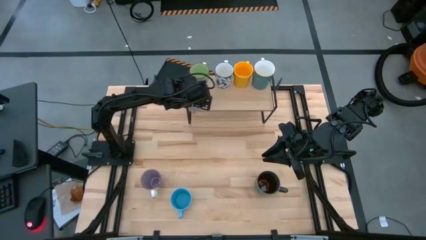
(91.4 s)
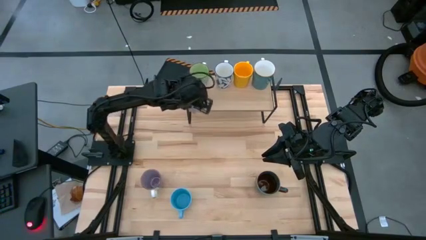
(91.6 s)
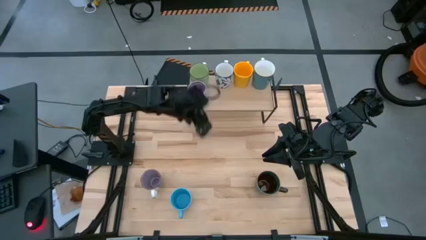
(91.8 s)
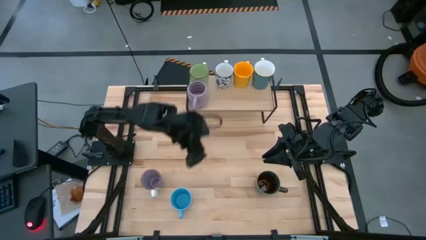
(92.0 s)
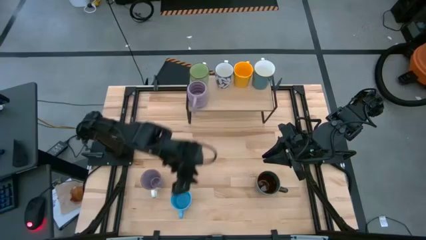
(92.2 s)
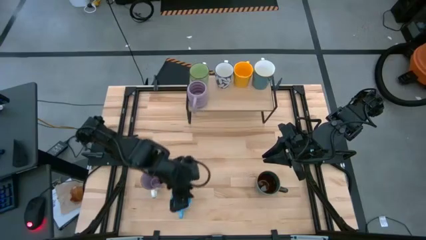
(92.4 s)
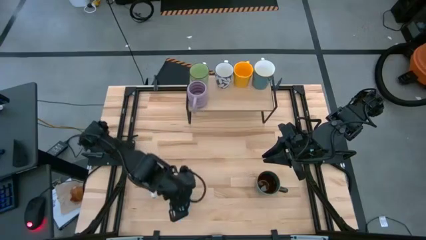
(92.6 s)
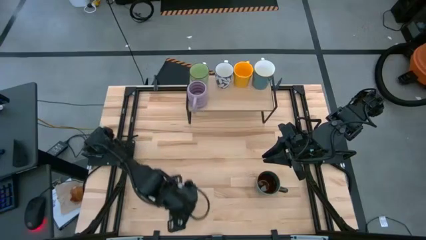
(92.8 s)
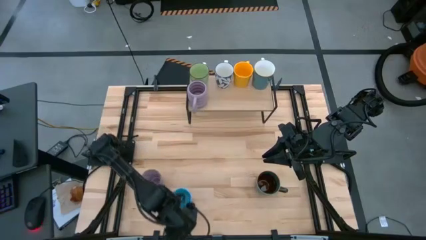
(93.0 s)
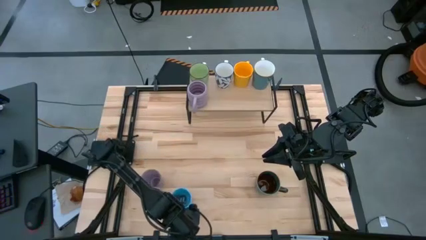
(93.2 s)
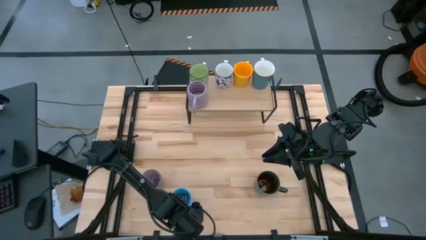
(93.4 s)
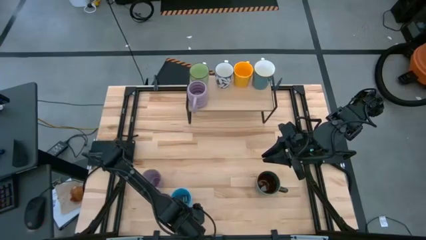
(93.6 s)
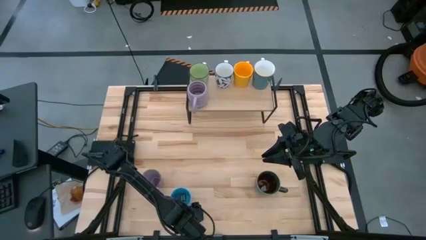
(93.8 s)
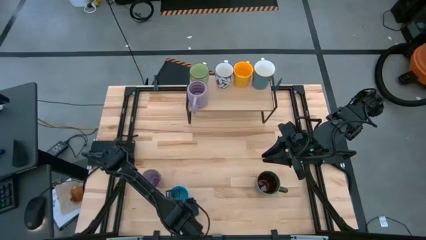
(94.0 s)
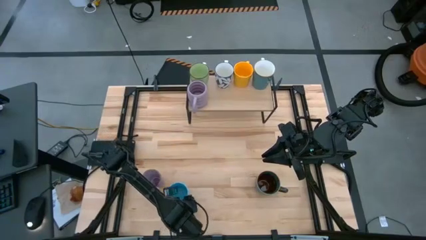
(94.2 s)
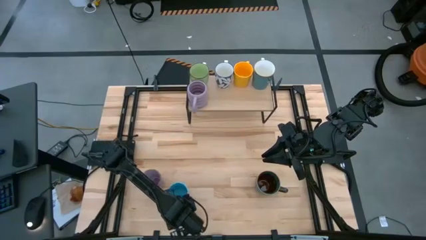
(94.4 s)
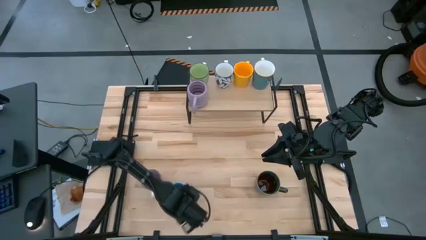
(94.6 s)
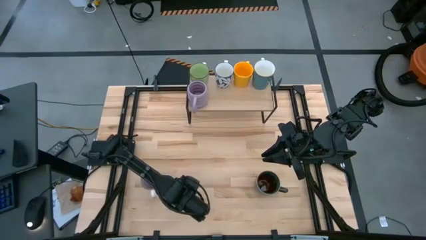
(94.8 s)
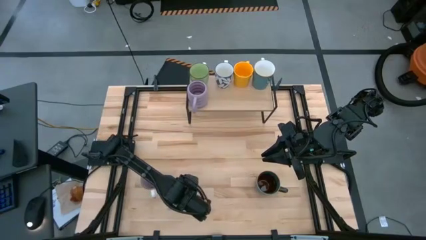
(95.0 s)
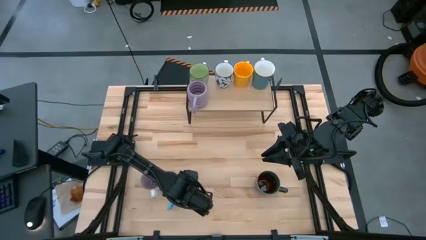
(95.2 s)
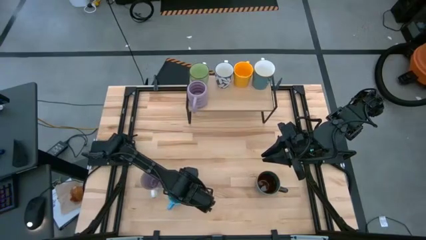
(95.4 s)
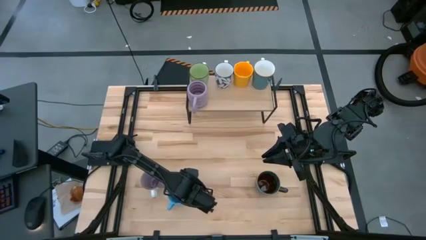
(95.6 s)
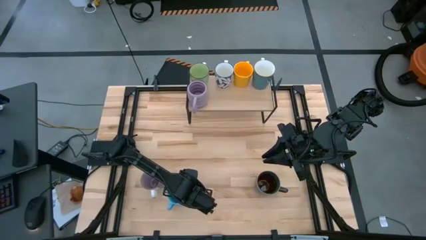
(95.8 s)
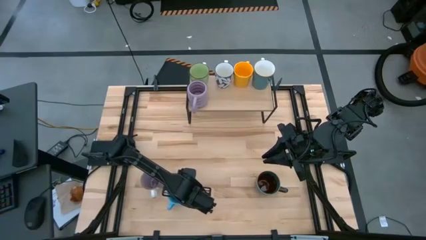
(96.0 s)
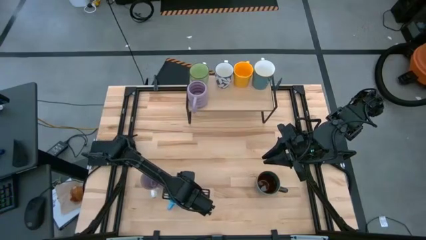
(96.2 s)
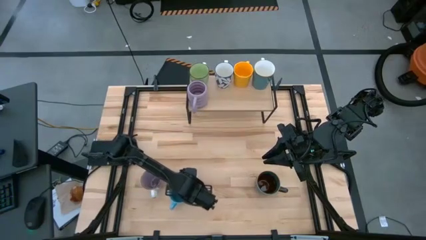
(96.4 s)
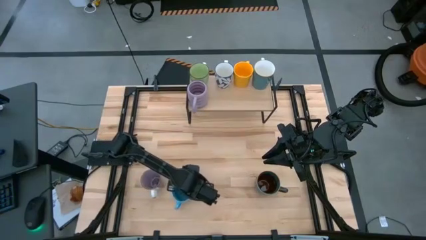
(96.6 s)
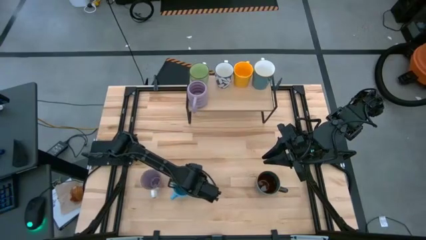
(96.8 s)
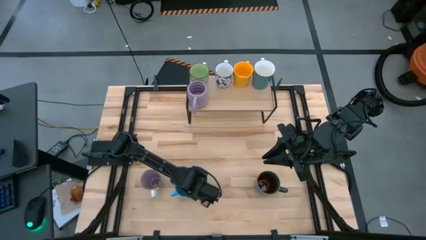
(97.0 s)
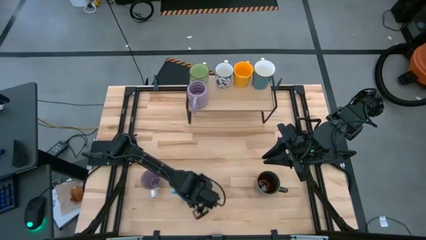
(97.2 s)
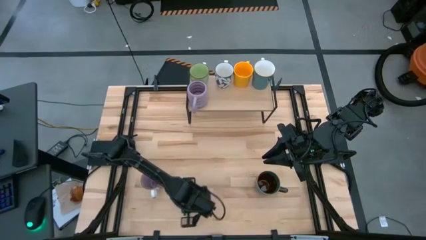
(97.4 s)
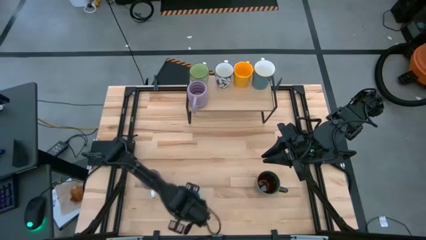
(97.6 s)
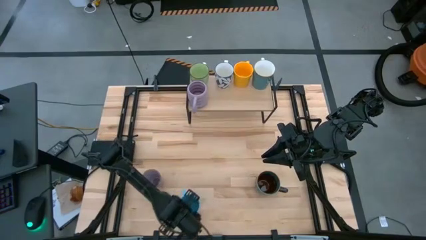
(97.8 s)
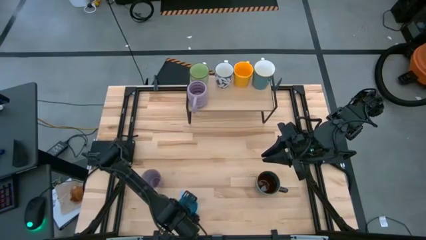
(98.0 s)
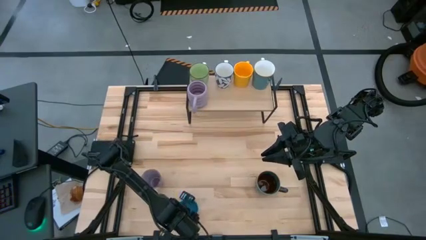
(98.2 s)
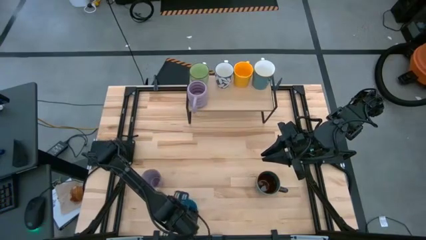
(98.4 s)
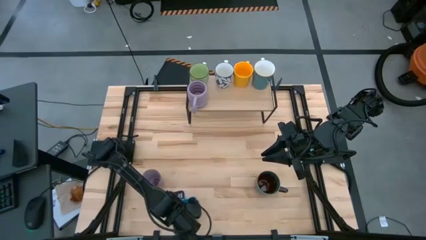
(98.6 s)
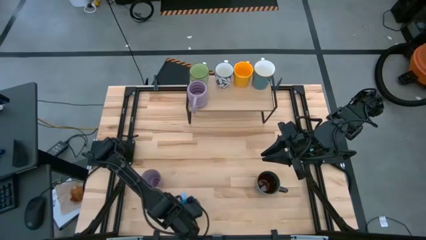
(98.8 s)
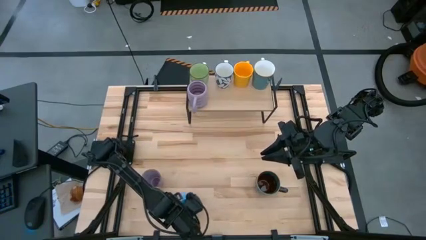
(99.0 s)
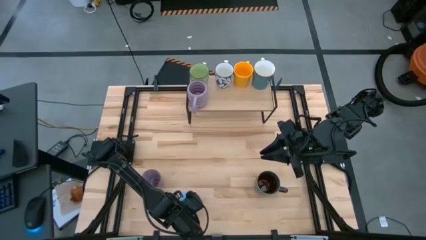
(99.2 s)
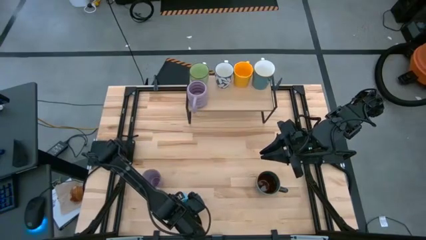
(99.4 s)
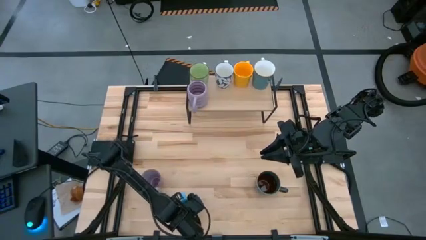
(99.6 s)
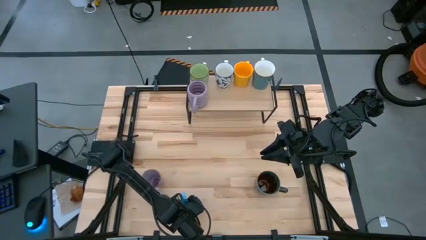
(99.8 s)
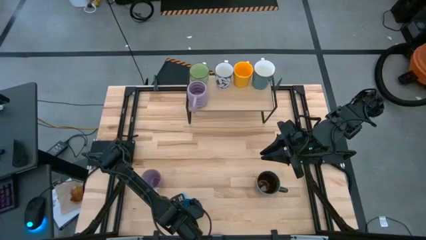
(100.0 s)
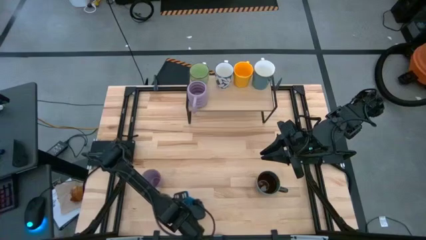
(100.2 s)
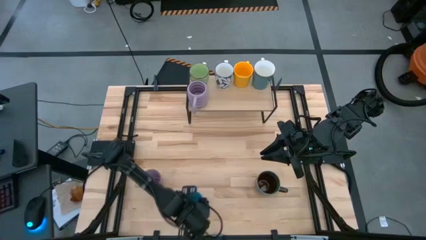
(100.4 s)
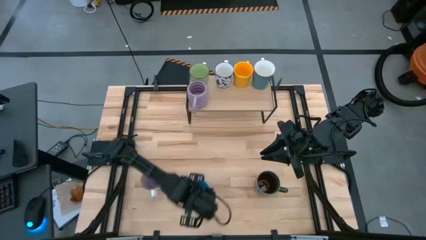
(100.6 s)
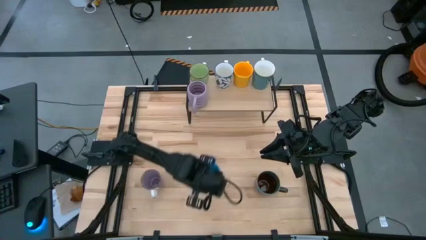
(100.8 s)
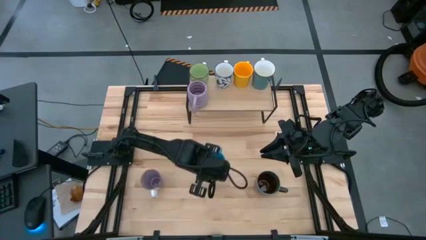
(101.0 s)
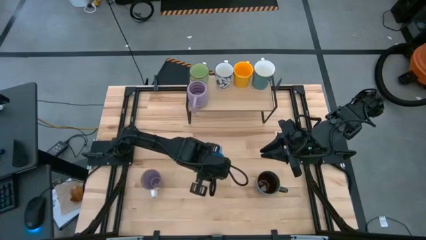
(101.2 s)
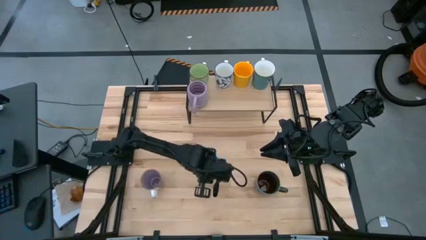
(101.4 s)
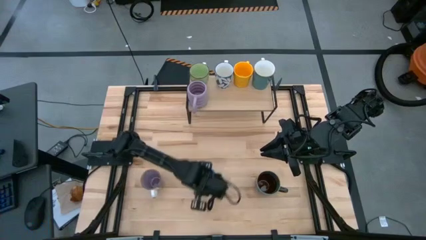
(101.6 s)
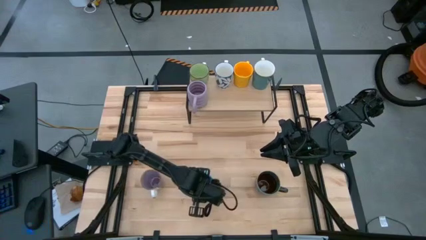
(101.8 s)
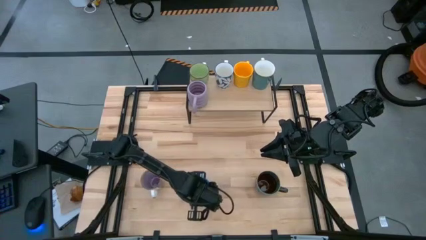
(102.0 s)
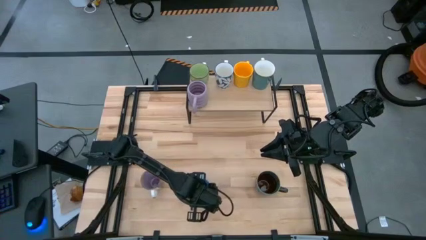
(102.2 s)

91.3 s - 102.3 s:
Task: Place coffee mugs
Put the blue mug on the shelf

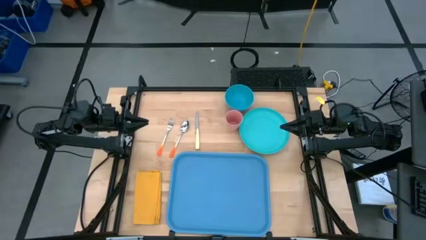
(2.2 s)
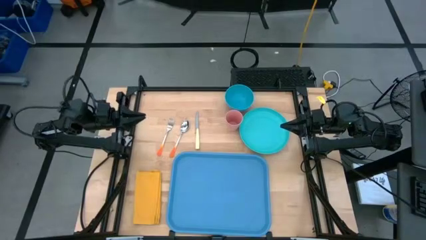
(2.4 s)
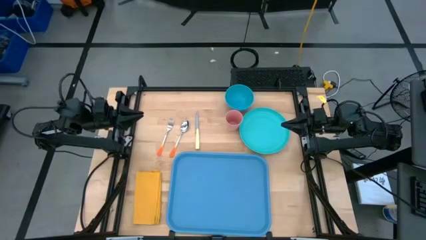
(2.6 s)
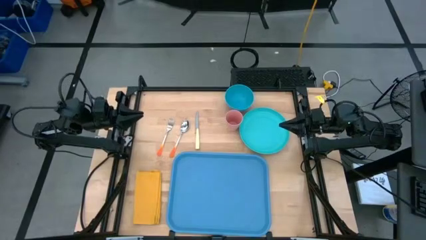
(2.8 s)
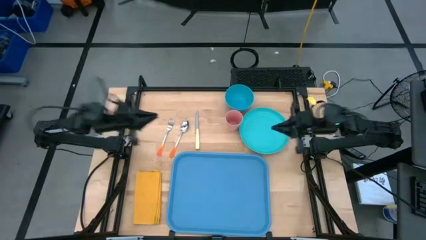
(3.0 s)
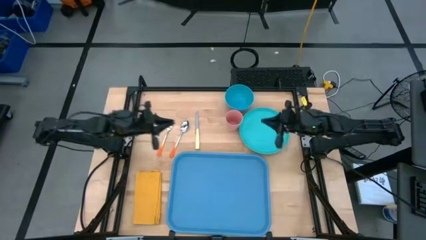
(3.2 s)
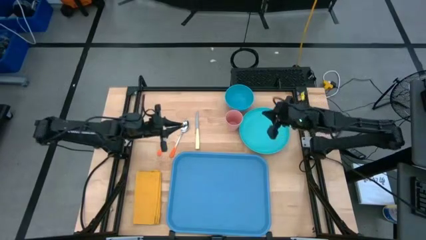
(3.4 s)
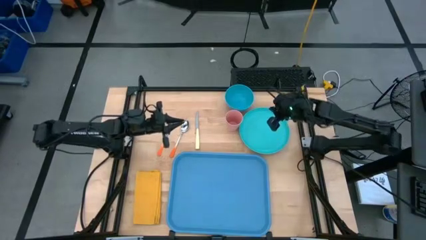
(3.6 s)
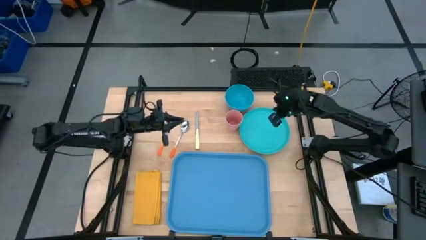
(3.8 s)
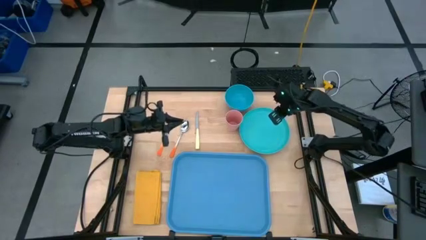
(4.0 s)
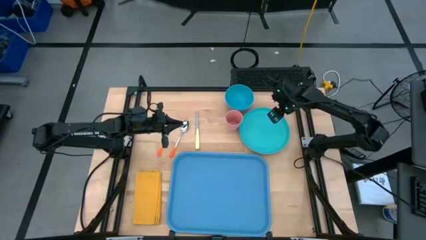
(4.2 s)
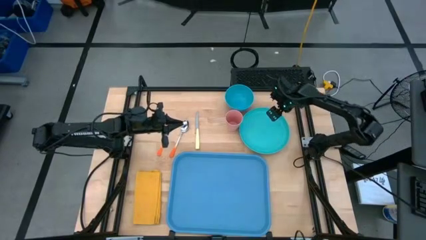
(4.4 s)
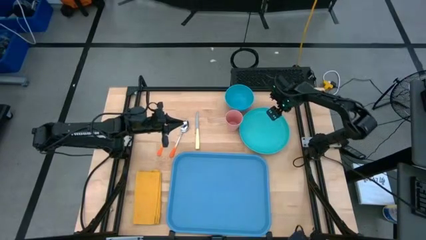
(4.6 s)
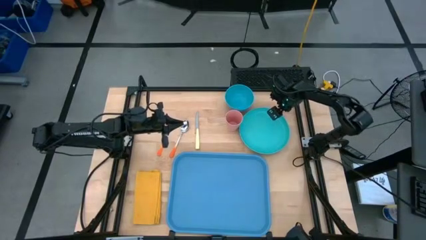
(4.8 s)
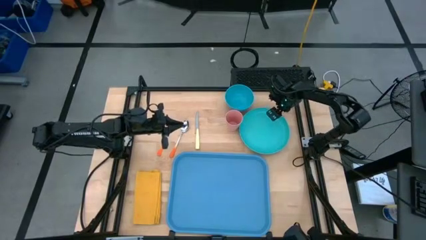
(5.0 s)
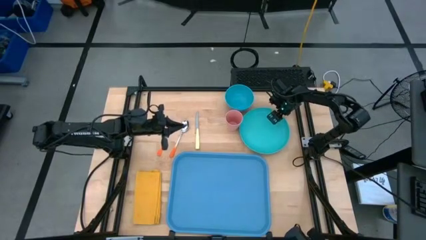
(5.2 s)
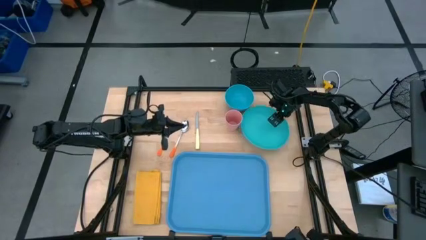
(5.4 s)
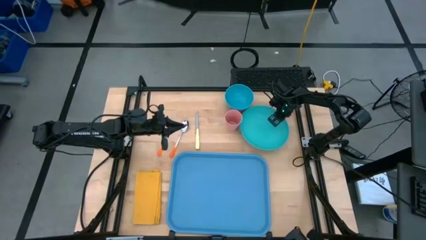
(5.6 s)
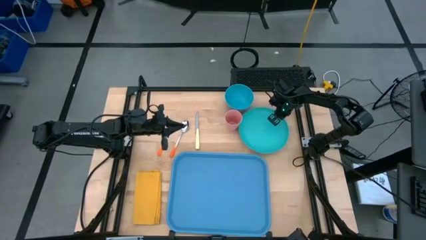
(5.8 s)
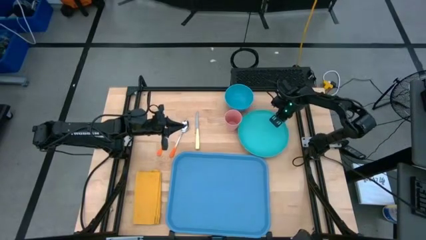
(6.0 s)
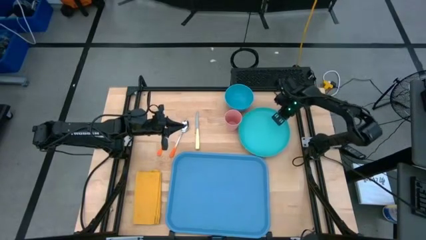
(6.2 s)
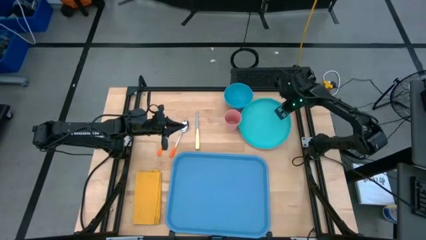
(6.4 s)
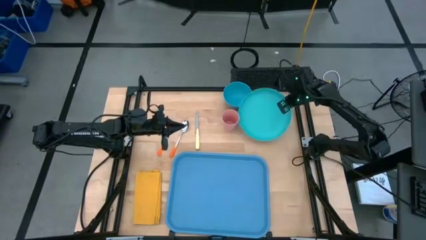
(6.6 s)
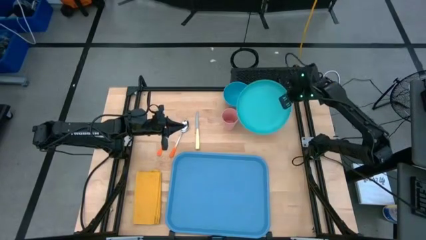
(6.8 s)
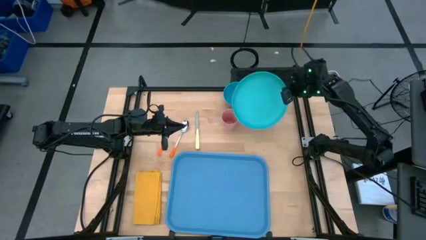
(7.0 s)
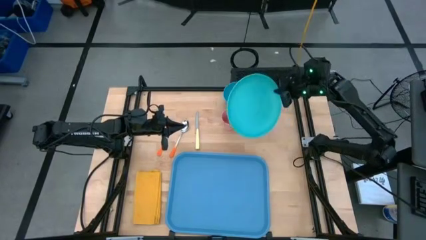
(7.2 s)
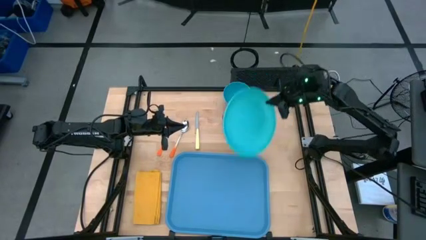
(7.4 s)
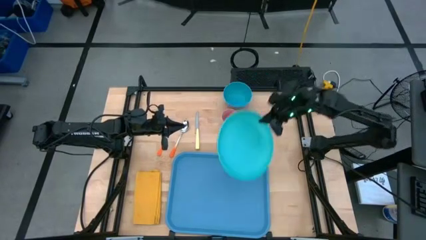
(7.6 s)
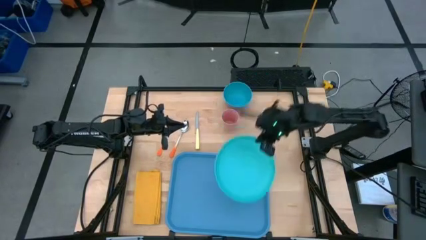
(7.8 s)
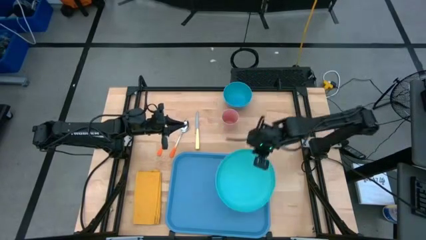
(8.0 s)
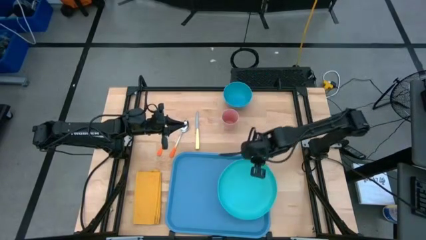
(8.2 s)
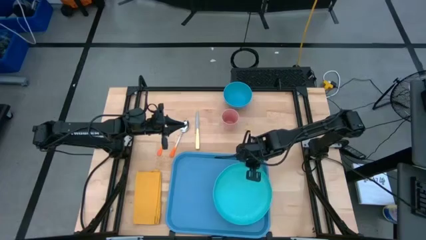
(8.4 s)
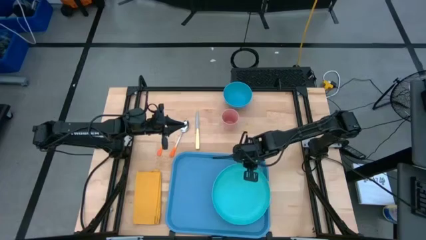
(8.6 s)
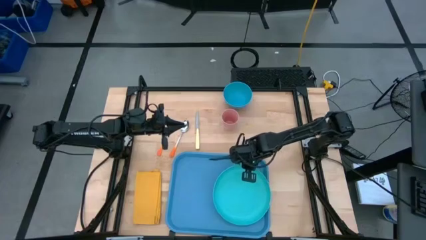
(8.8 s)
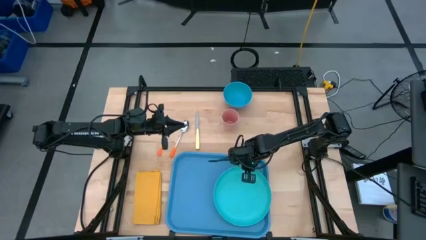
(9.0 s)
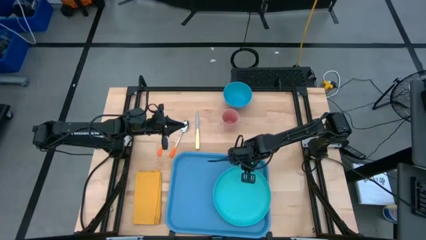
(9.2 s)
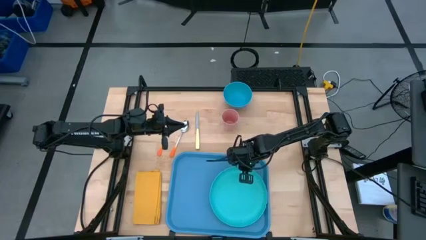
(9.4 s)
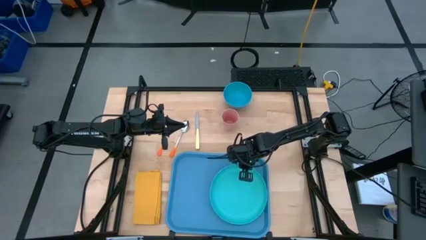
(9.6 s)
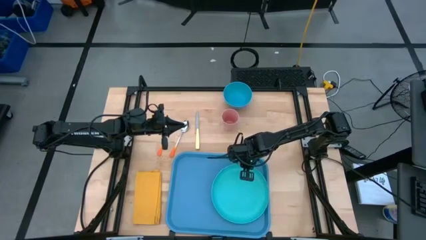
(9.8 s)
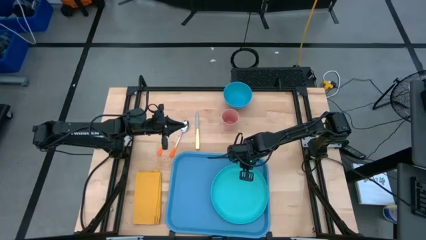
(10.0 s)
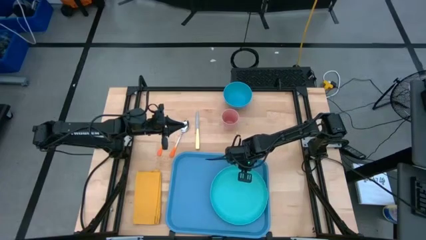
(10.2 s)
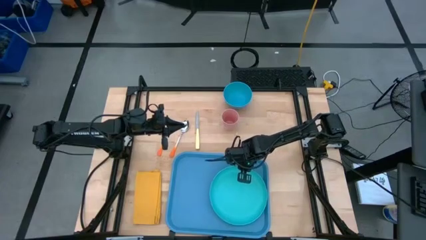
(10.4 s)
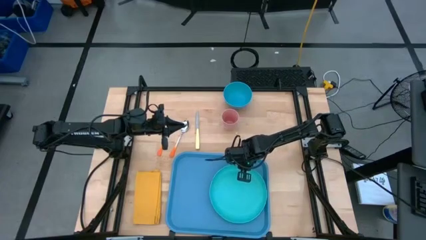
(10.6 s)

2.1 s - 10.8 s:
Task: Set up tray
Put the green plate on the serving tray
